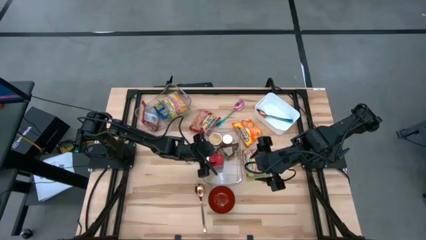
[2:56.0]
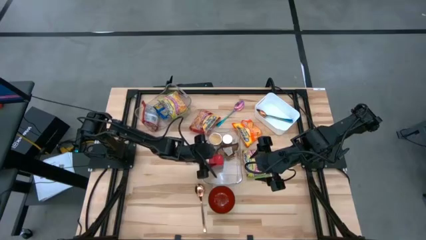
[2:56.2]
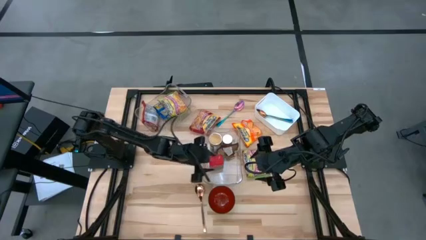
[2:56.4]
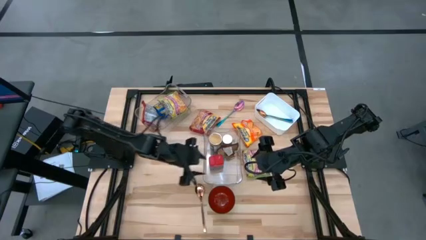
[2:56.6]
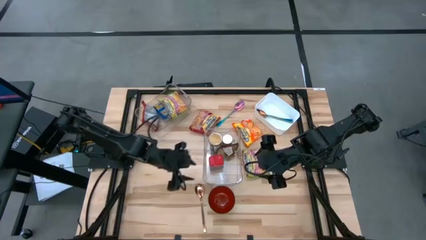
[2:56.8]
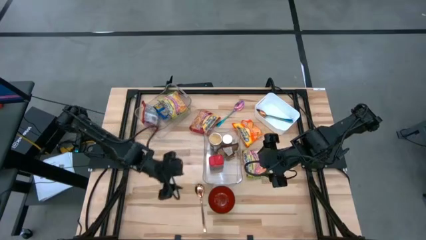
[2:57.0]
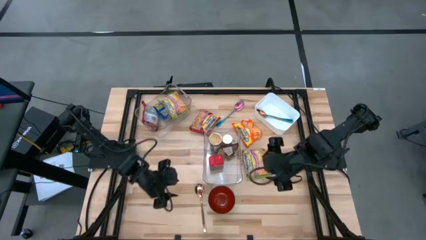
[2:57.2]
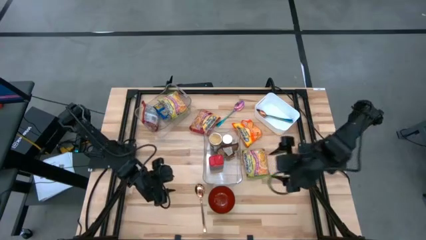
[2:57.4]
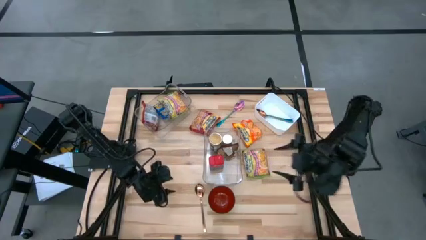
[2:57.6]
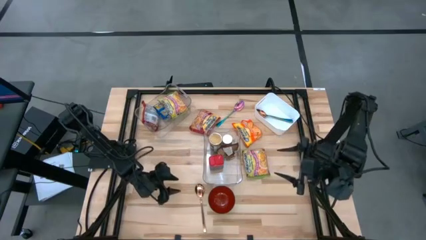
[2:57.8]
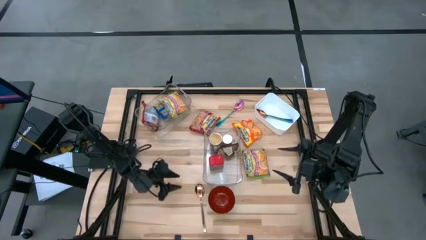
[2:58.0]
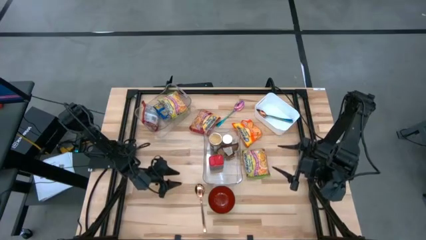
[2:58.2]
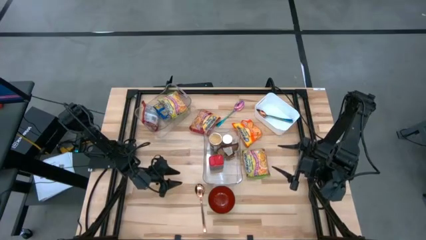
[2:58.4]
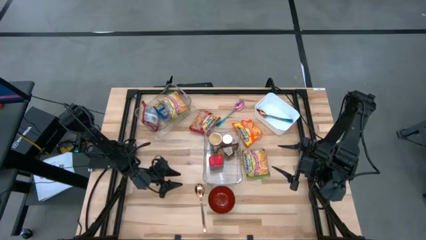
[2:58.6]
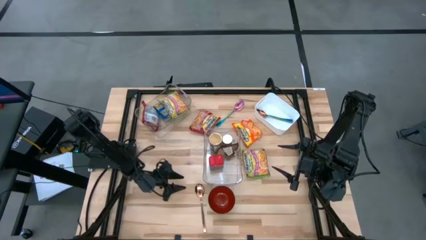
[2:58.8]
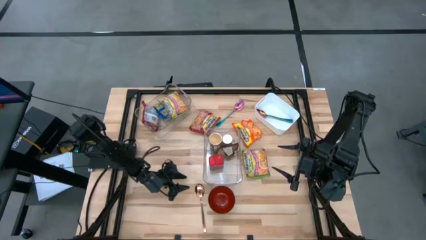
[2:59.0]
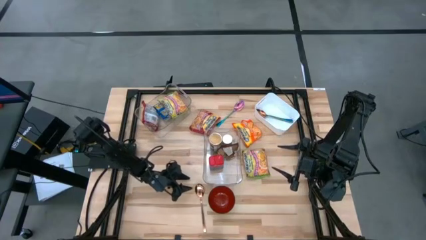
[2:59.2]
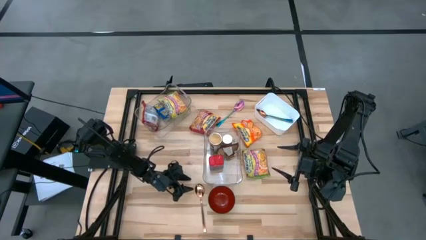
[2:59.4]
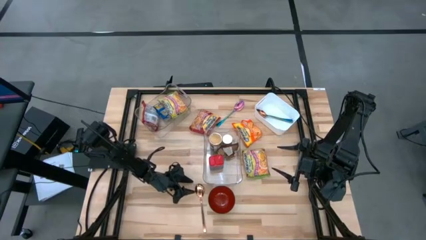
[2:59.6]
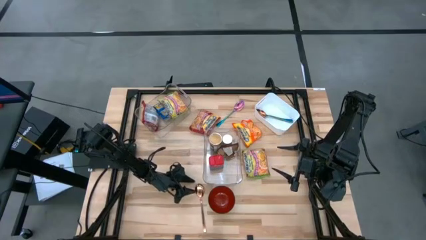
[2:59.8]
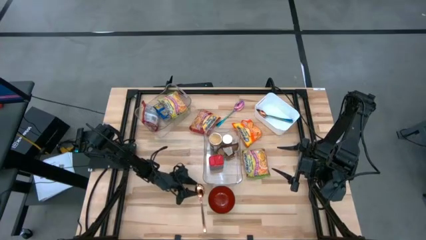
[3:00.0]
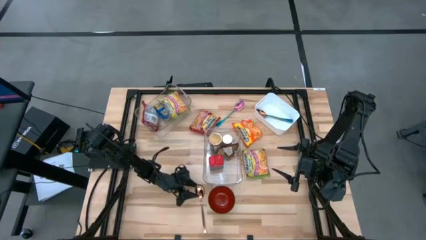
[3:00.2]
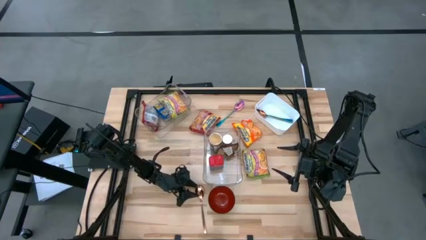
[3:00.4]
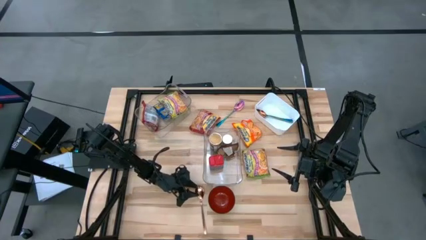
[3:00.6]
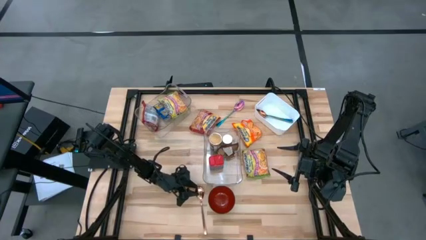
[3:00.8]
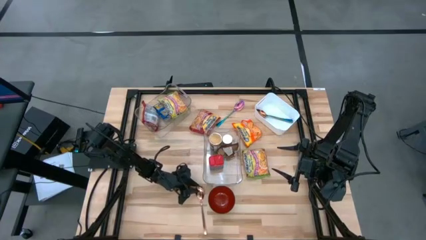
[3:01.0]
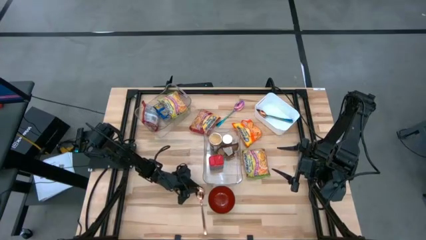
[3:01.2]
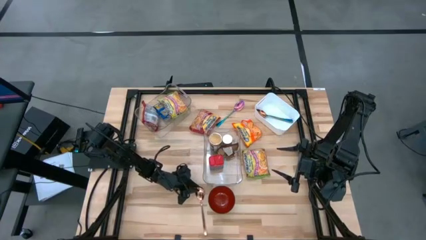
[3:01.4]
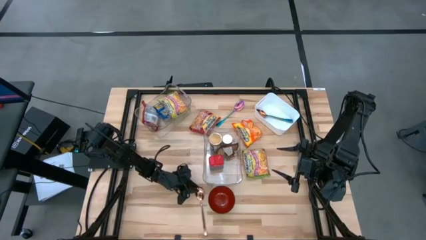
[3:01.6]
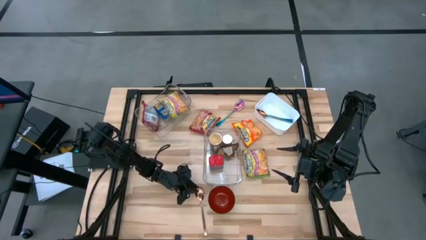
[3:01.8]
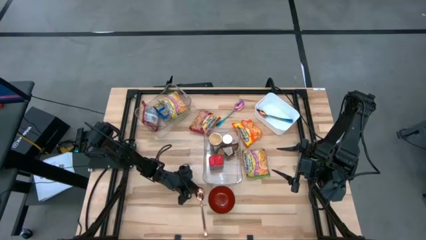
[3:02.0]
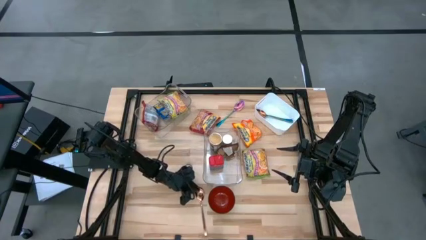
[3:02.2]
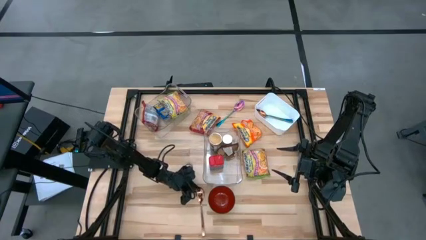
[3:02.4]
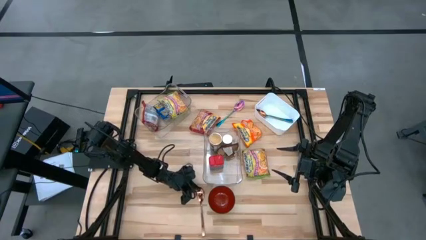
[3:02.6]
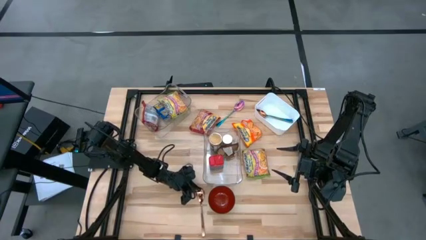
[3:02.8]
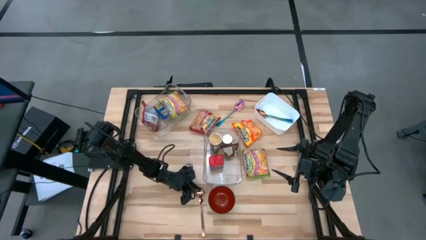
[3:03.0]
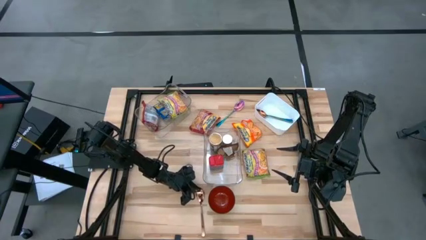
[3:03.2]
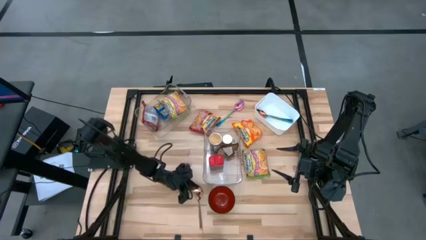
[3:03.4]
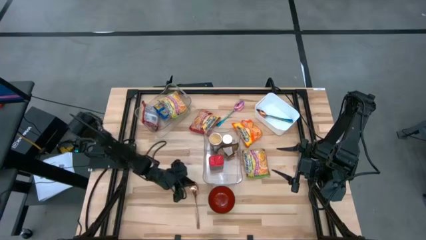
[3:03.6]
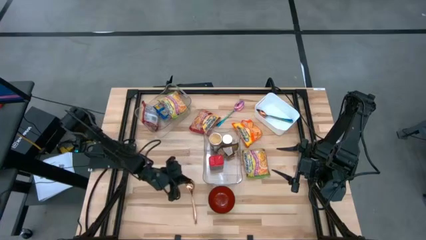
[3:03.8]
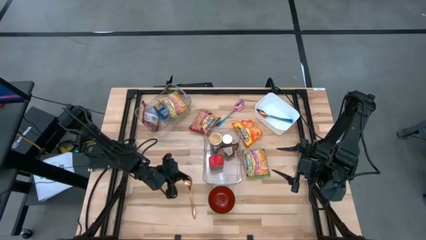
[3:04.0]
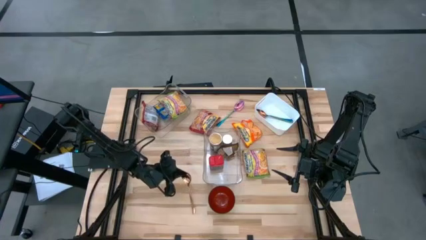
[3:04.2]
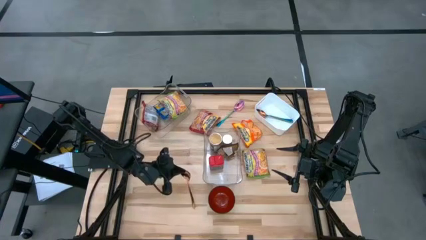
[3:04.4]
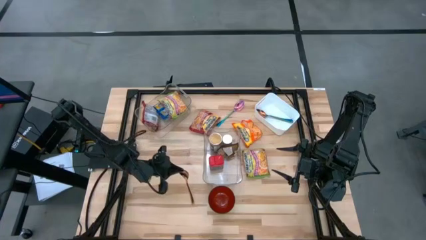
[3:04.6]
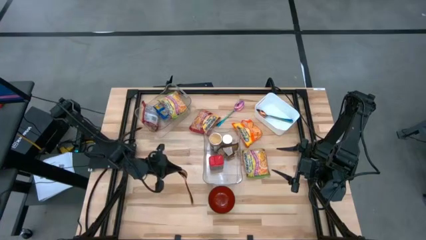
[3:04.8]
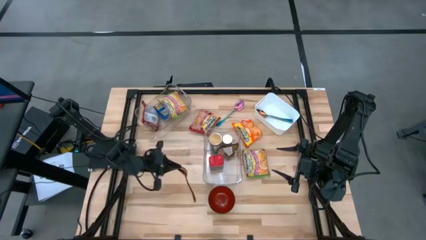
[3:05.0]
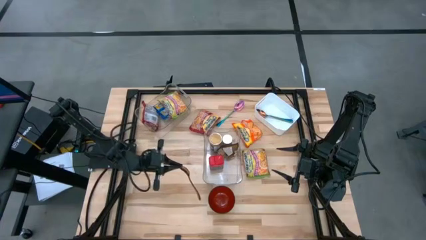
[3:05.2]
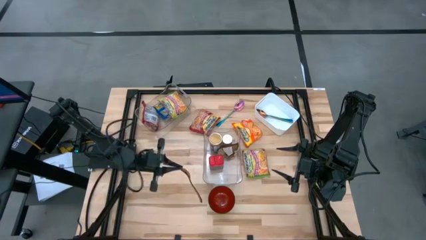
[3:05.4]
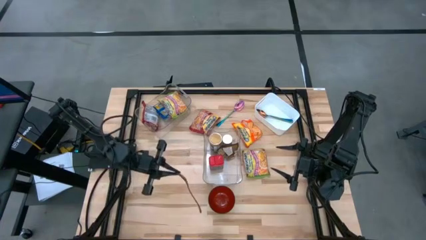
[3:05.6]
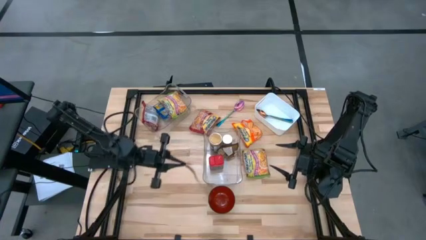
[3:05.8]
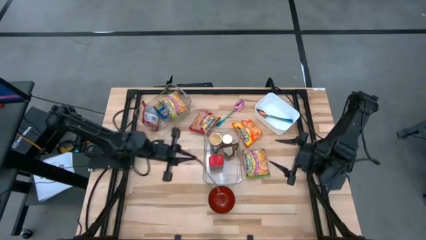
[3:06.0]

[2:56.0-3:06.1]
Task: Pick & Place Food Item
Put the gold spoon into the white bin

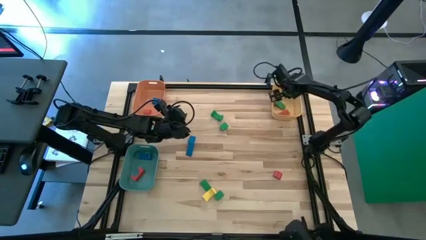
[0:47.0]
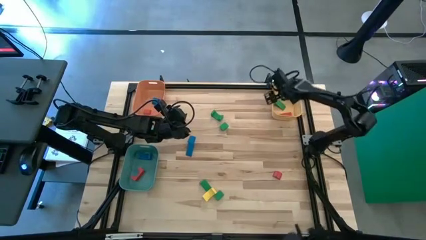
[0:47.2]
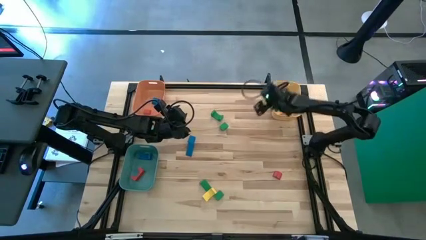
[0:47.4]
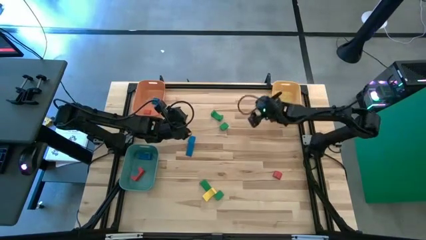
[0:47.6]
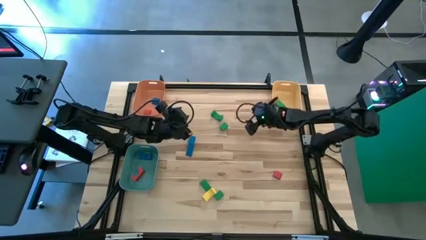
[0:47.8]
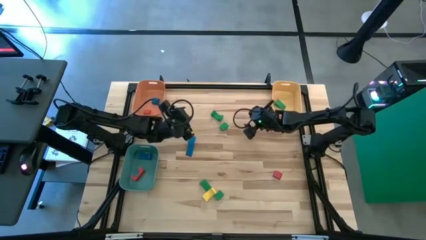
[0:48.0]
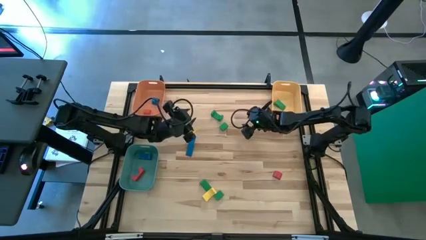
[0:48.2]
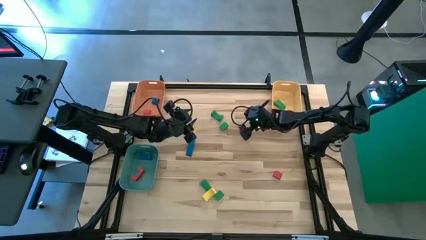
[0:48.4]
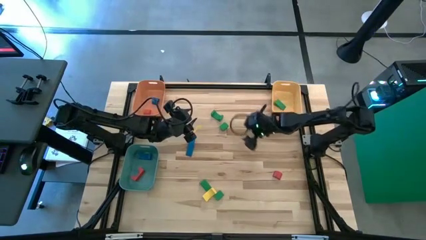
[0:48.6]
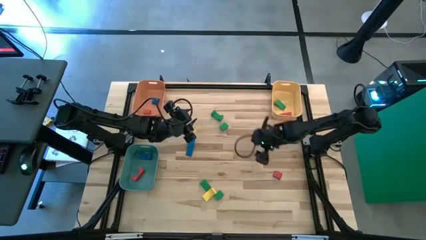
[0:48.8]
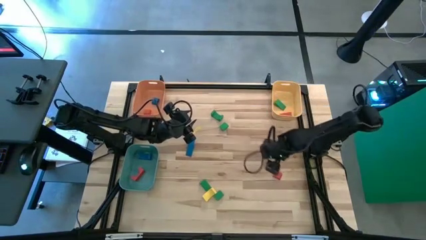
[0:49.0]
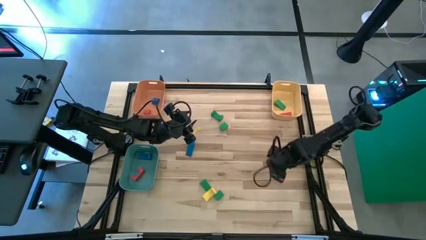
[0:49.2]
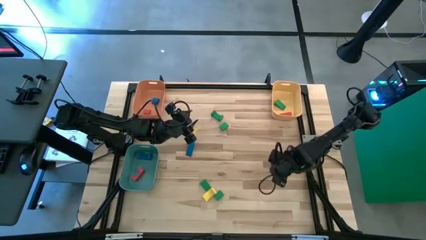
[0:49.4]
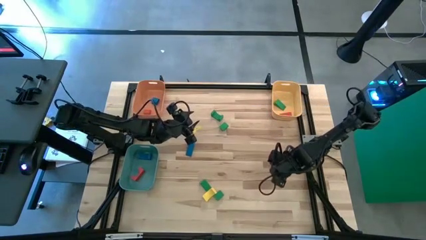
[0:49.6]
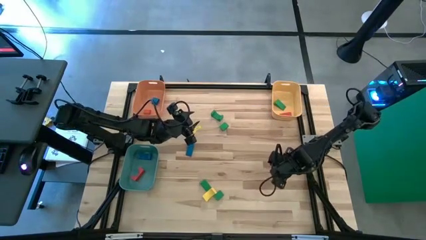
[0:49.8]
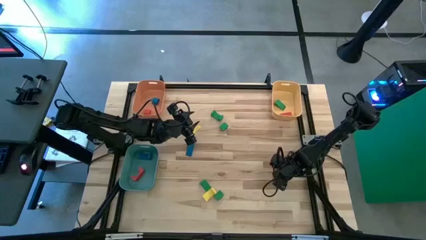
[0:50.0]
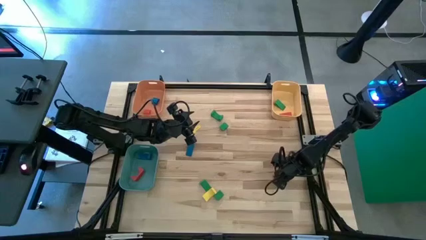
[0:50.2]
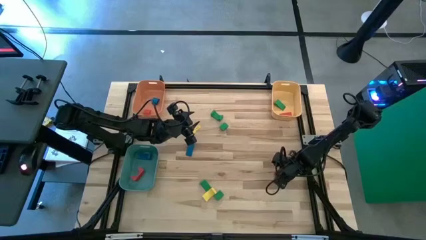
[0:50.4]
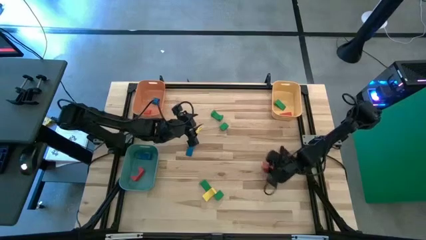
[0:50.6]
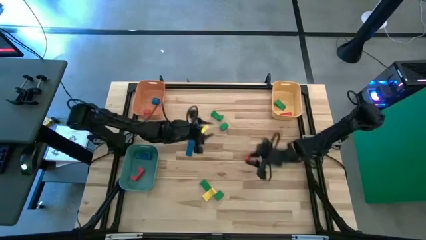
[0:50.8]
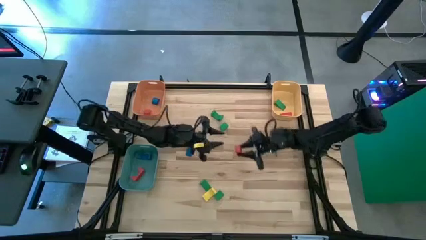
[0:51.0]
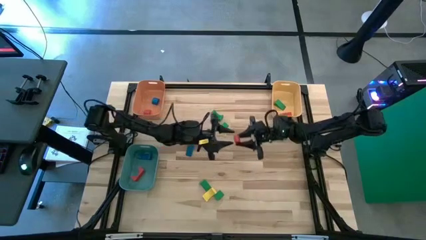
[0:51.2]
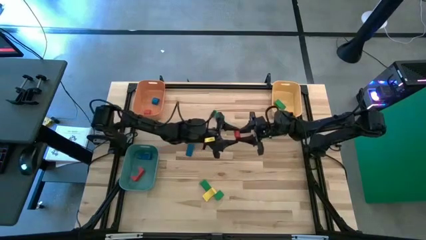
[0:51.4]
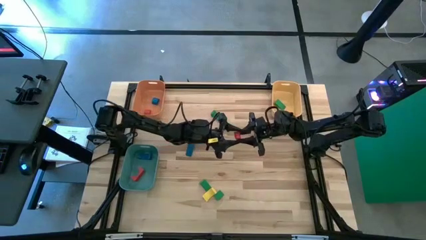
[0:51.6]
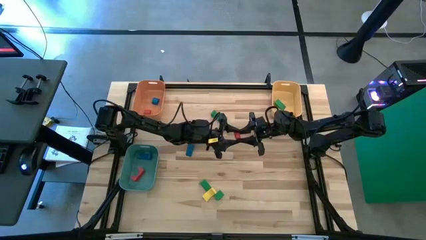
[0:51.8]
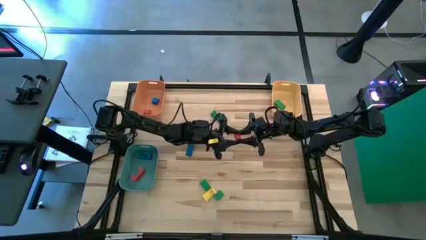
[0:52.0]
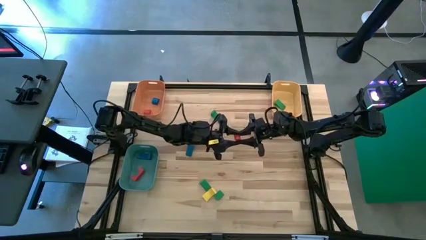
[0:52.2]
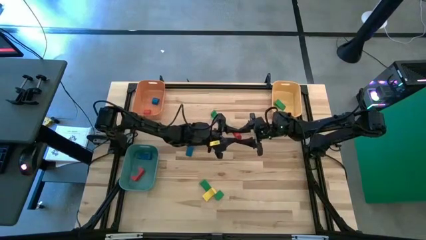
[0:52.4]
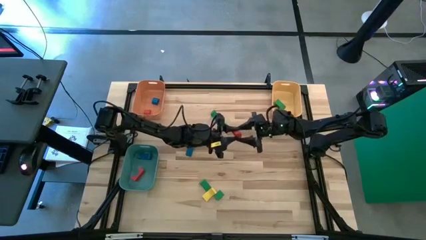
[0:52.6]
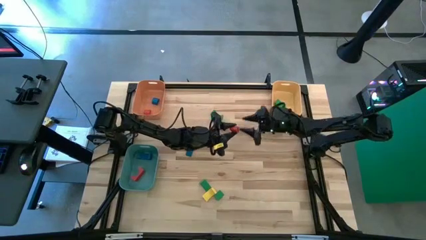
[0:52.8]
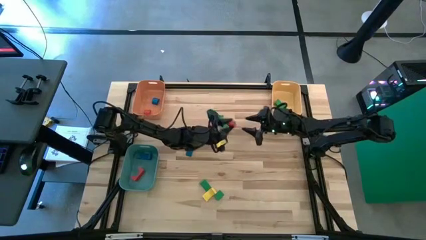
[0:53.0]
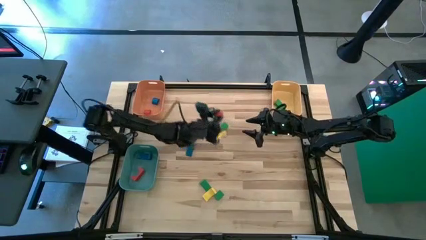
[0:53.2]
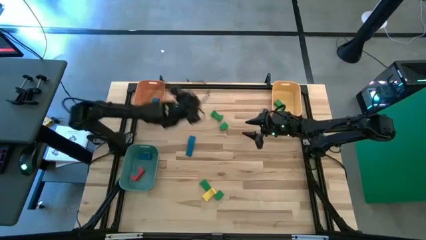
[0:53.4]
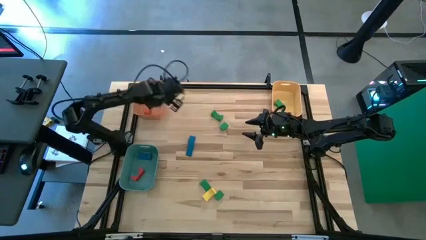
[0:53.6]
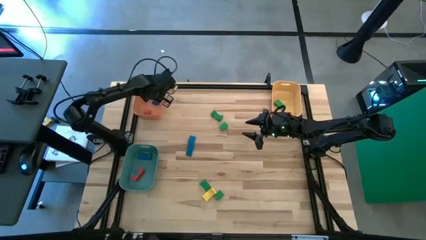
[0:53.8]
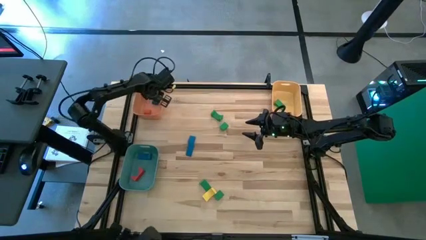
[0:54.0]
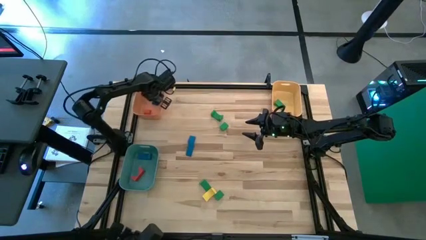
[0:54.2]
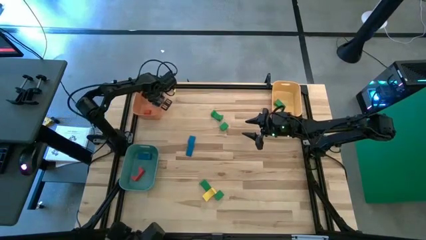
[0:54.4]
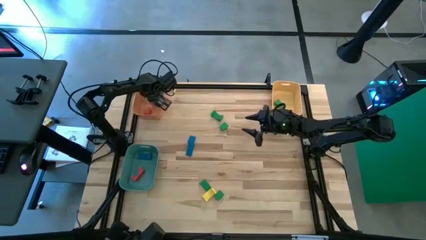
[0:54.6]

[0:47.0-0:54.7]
Task: Sort blocks by size
Put the red half circle block into the orange bin
